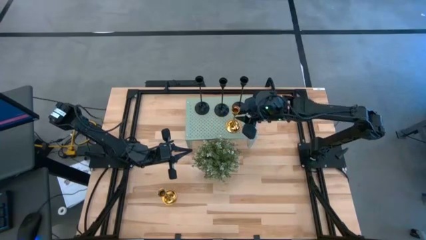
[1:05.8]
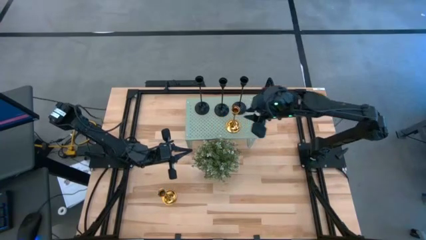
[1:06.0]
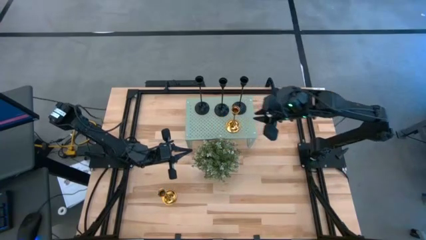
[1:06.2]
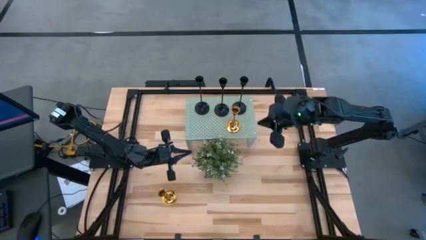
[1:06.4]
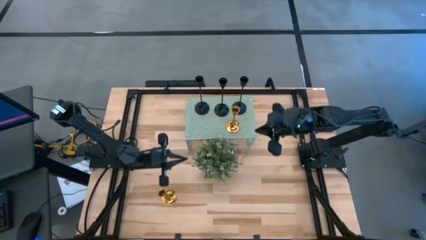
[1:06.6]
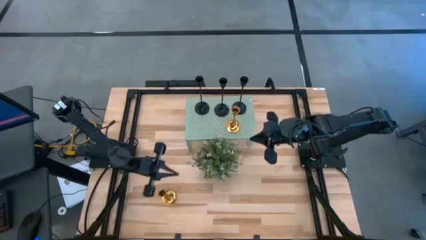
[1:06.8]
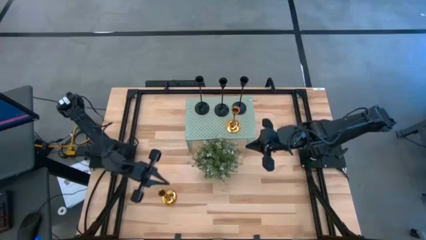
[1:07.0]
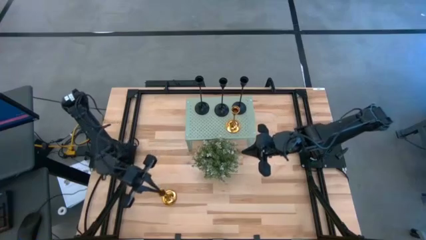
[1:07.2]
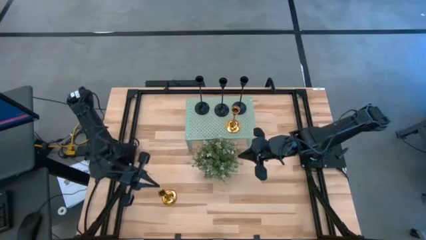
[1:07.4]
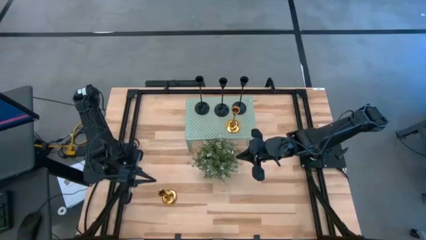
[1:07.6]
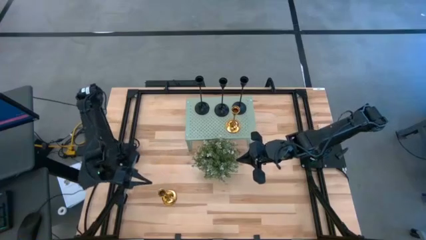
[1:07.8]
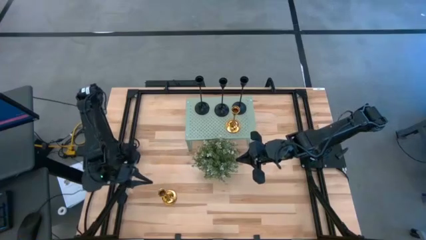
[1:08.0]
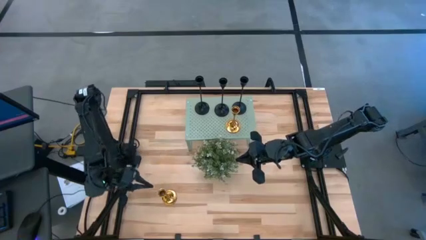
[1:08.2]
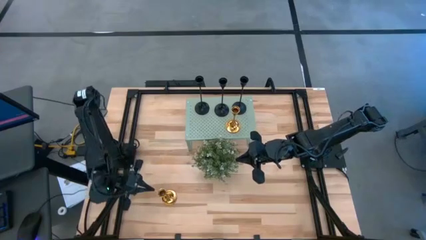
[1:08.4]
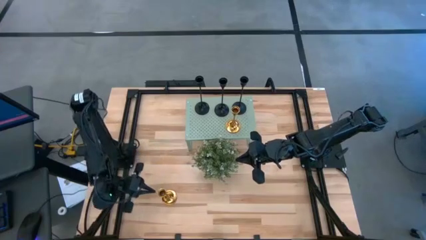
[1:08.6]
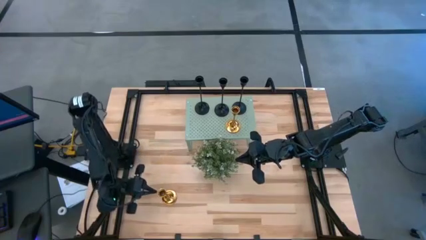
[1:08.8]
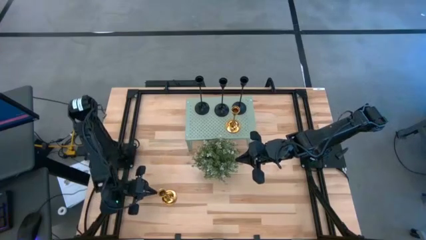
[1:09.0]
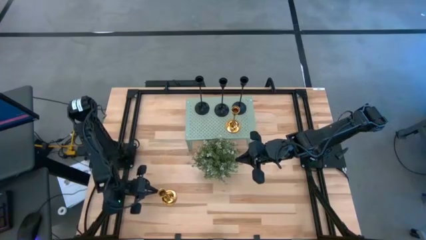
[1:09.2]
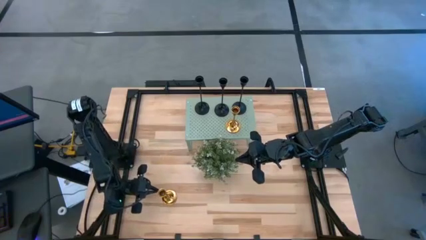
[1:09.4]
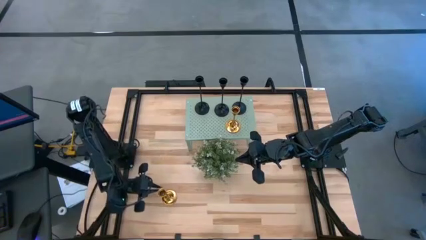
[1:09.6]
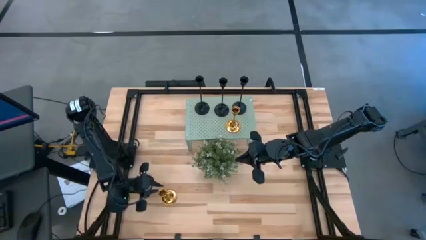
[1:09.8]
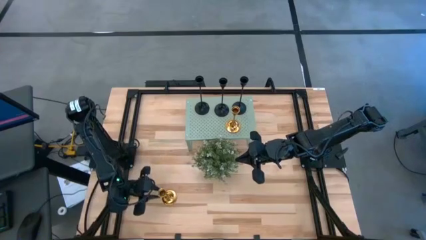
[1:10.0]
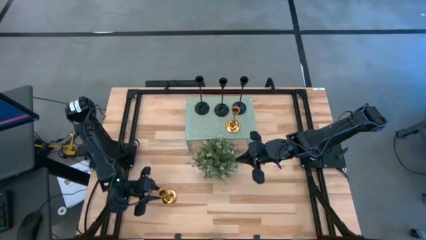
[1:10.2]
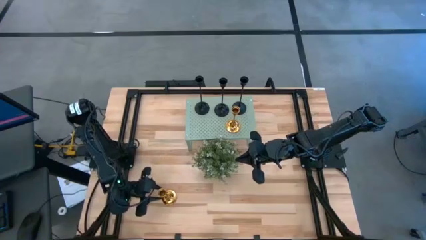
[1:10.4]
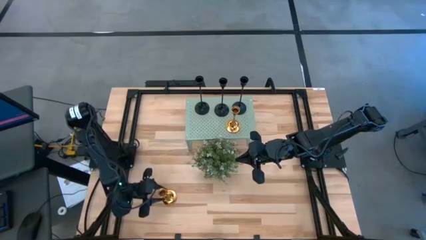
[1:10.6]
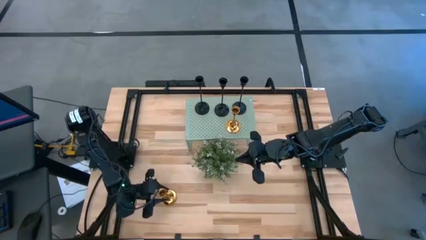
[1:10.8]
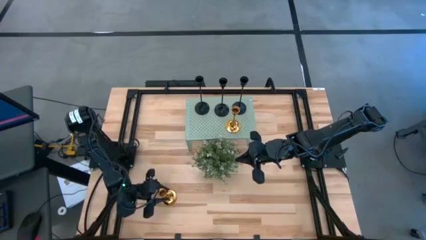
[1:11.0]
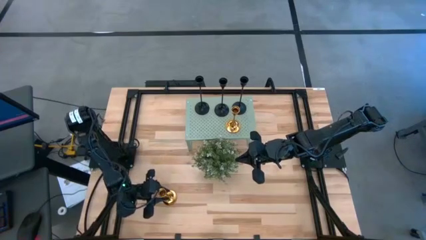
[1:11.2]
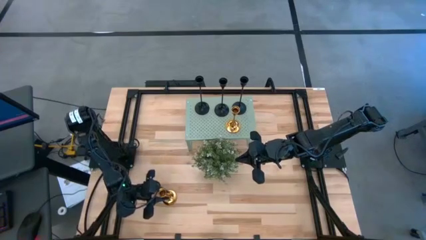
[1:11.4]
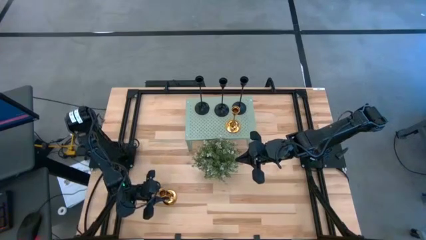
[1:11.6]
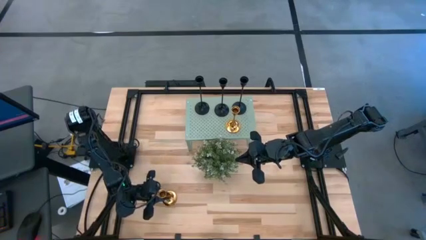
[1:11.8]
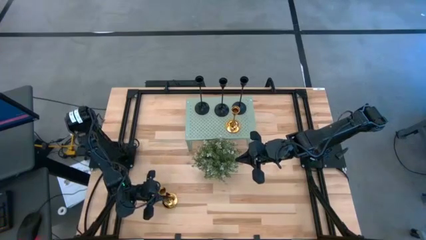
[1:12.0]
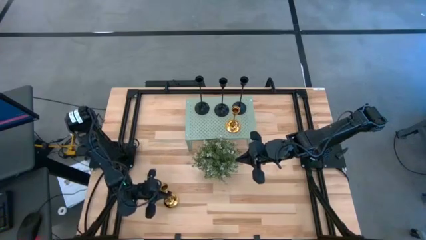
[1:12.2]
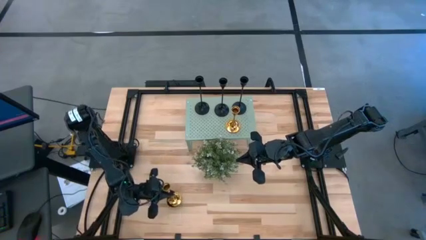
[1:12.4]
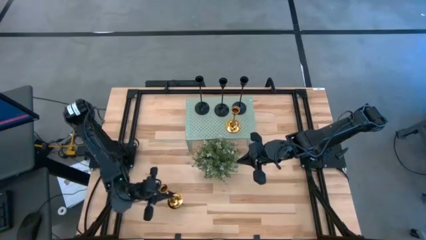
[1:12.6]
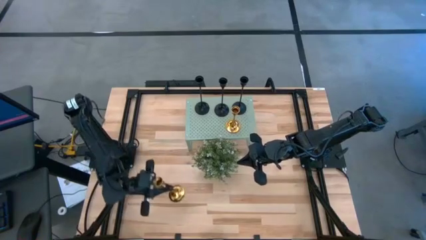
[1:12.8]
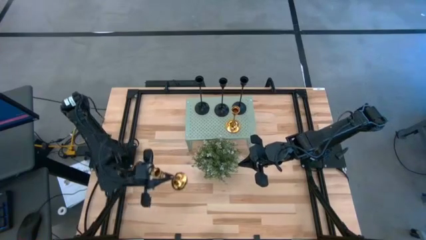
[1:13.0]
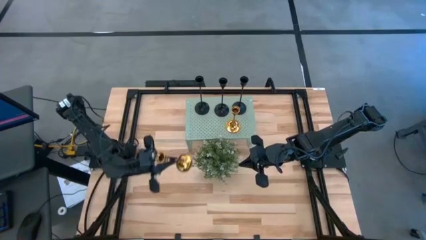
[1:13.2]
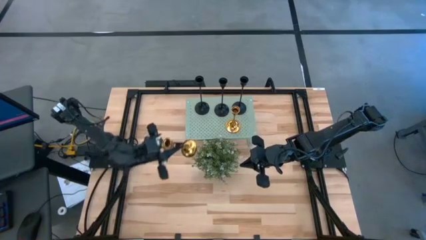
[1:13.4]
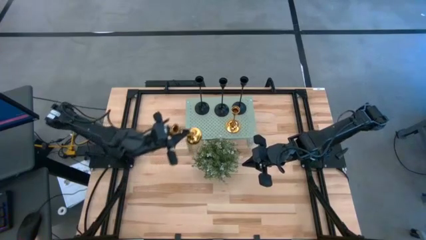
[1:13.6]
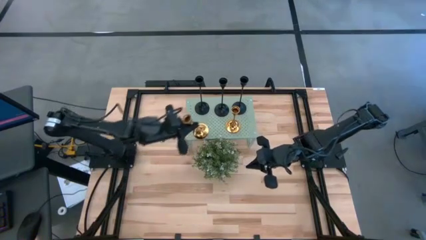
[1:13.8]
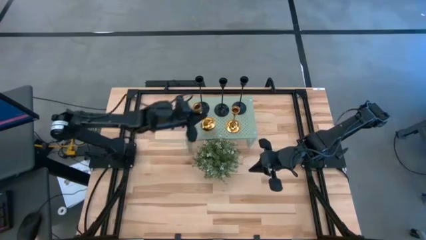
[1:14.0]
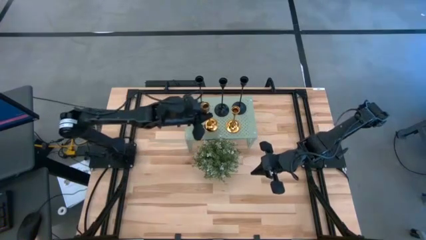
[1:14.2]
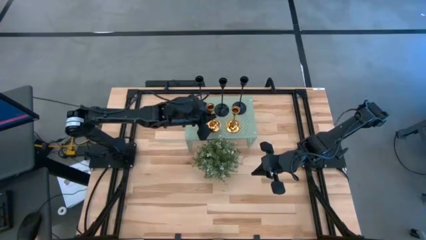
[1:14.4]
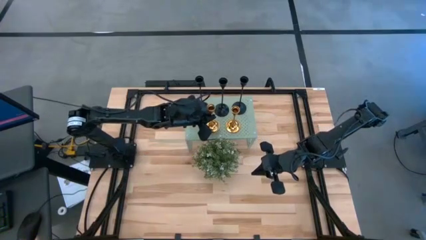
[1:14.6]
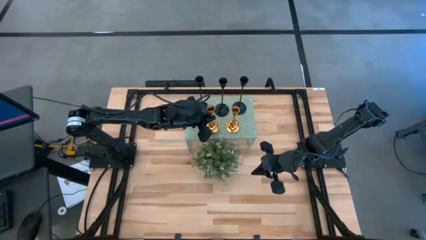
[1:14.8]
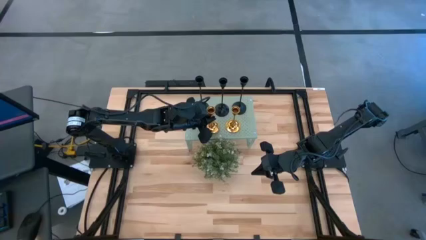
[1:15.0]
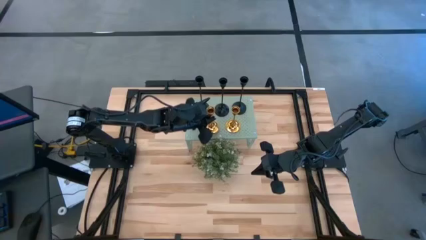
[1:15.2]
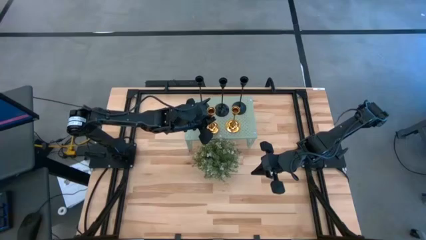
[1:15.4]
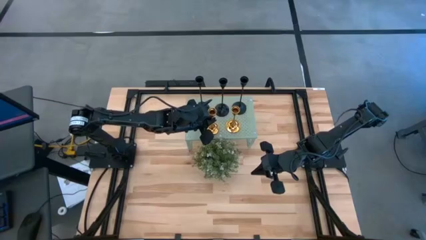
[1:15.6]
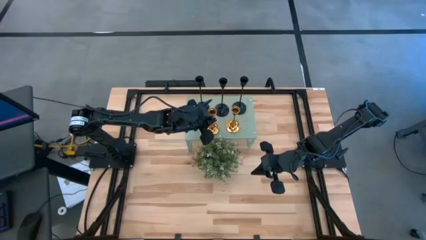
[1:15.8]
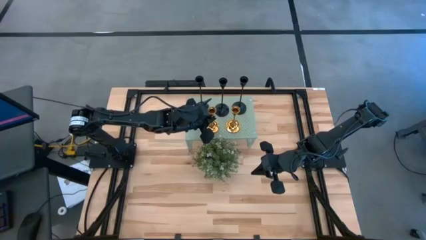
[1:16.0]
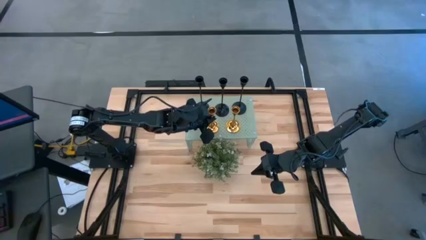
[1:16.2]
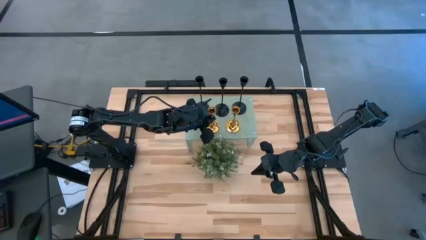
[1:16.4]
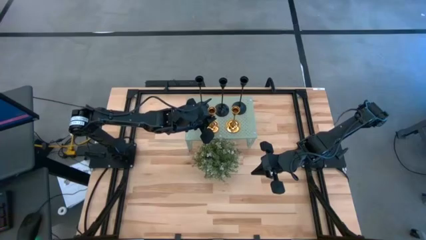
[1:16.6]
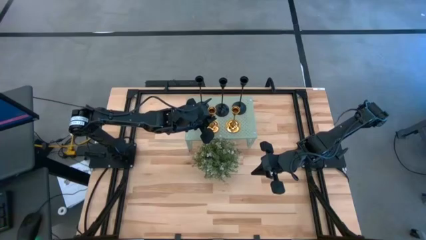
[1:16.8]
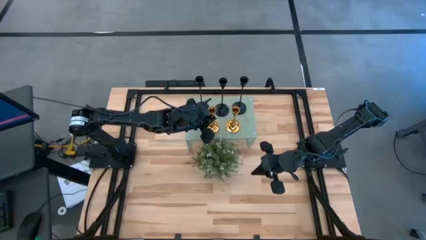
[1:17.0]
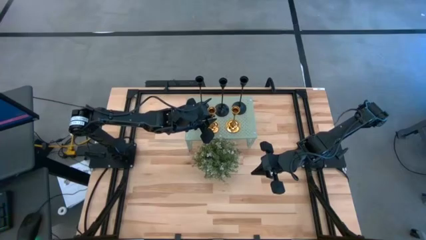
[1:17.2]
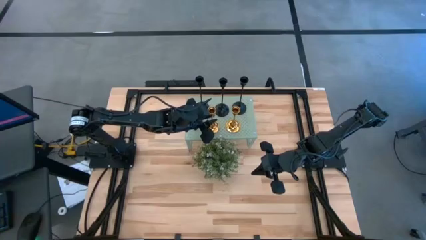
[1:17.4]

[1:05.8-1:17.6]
Task: Pick & Place candle stick holders
Put the gold candle holder on the shelf

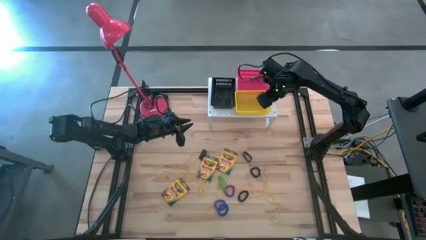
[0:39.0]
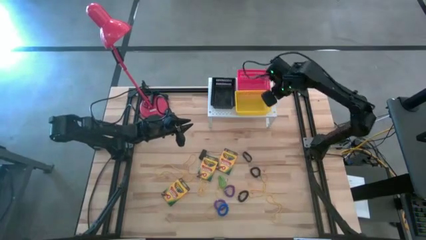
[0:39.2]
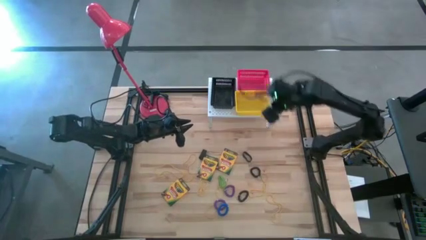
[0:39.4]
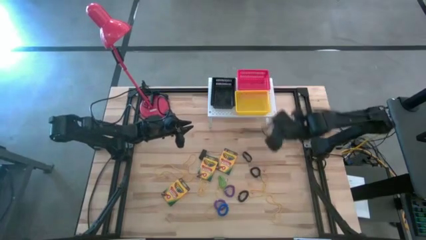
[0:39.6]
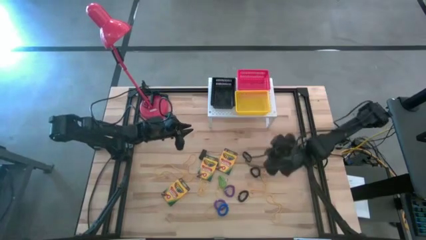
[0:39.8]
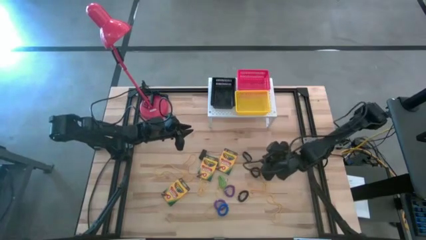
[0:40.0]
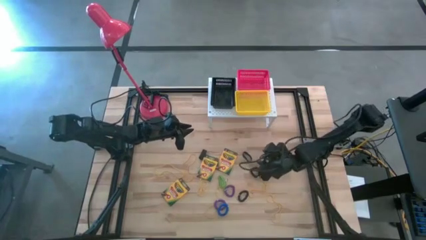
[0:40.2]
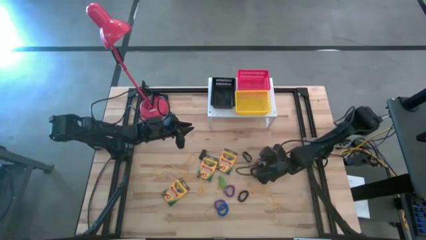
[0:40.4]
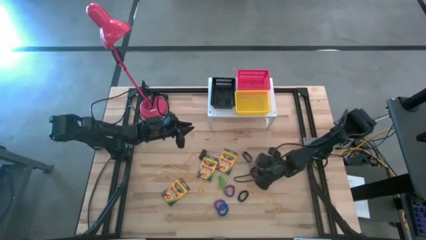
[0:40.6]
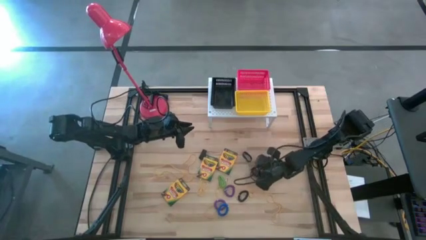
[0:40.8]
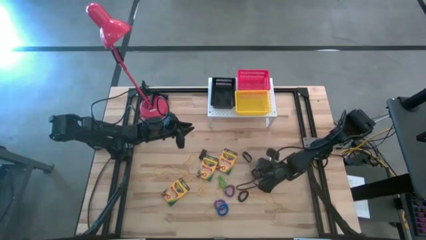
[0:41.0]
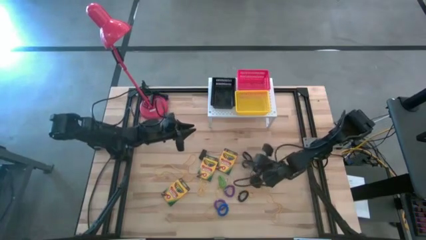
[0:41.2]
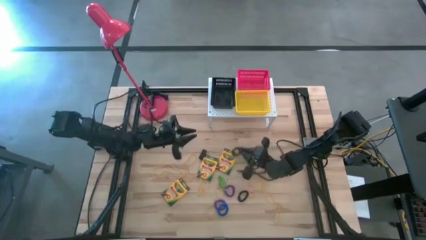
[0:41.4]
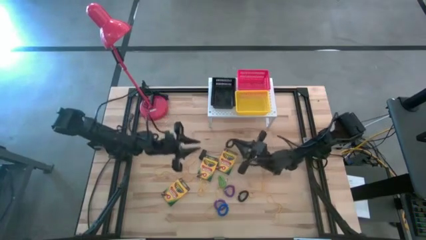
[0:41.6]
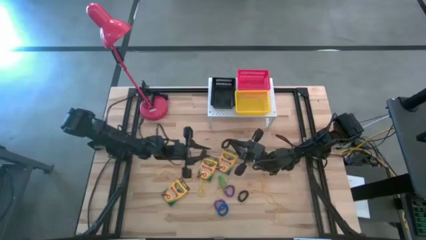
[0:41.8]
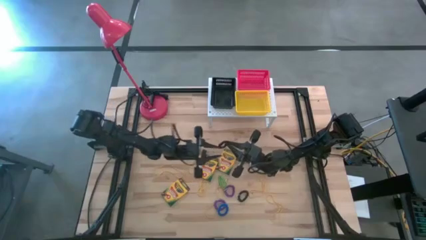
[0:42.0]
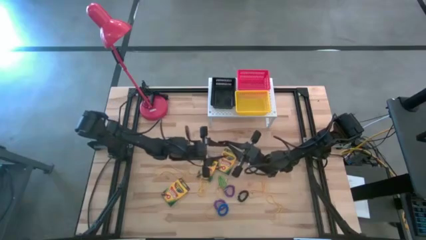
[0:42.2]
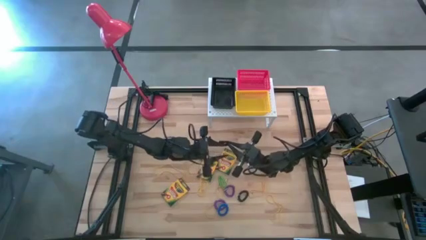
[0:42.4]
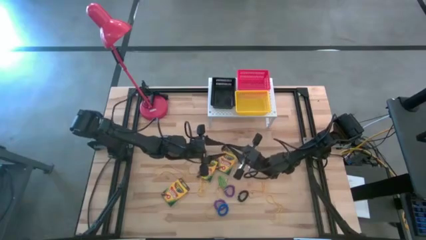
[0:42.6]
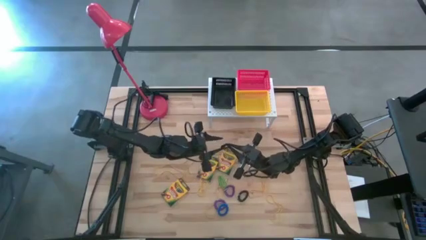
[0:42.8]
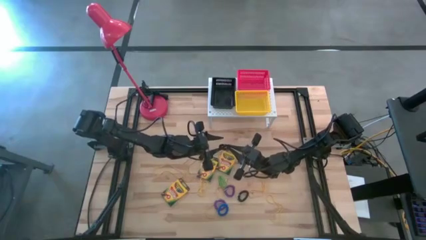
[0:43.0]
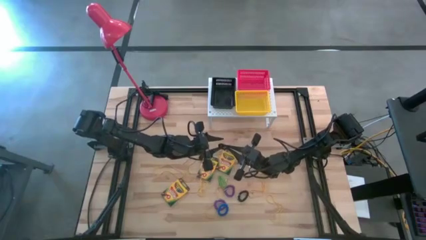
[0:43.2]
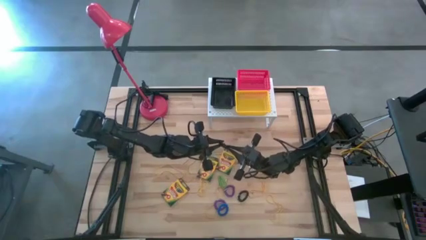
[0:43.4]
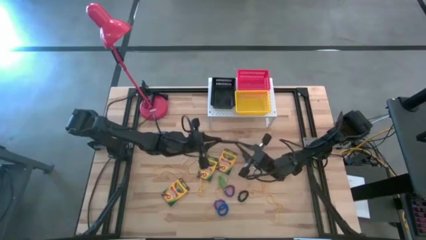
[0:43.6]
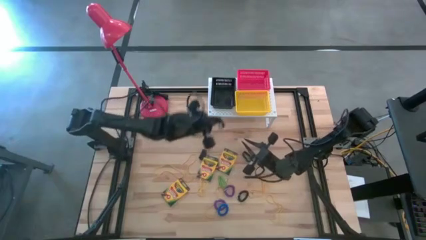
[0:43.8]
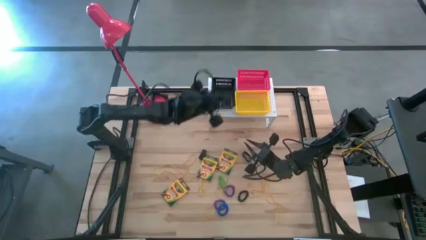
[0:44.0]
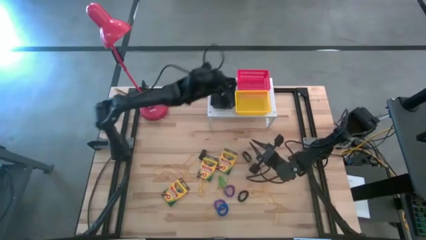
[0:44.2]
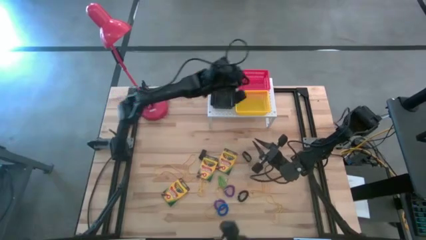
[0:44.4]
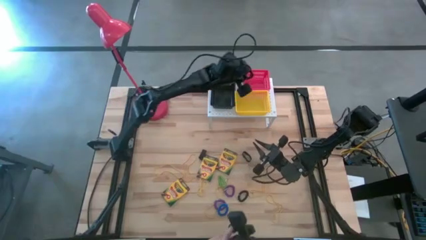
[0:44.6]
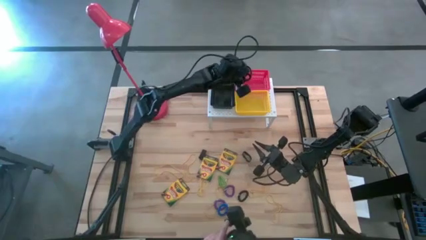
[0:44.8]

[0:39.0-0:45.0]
Task: Pick & Place Office Desk Supplies
Put the black spring keychain into the red bin on the shelf
